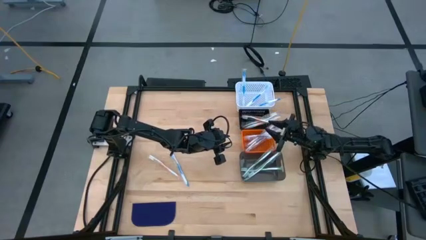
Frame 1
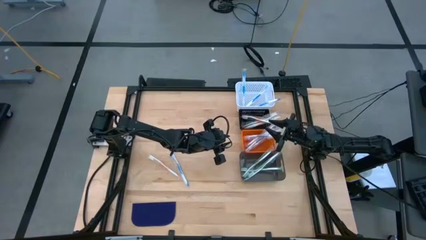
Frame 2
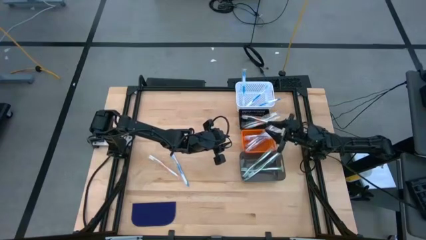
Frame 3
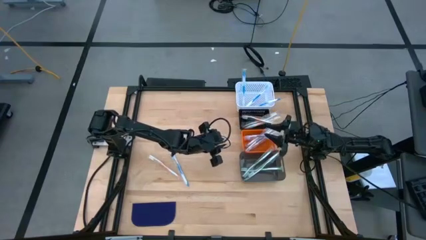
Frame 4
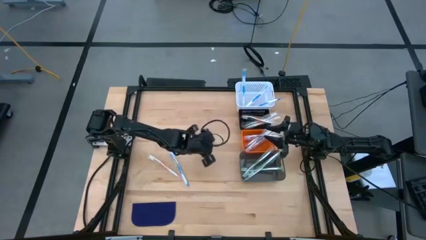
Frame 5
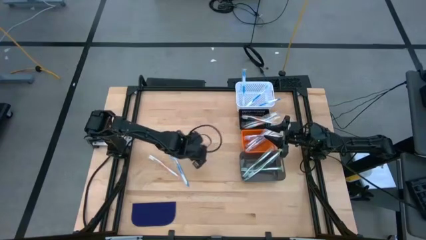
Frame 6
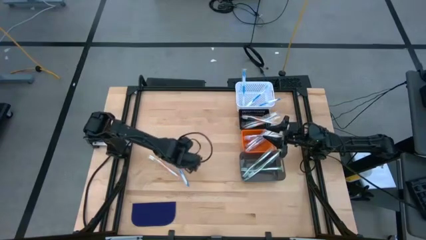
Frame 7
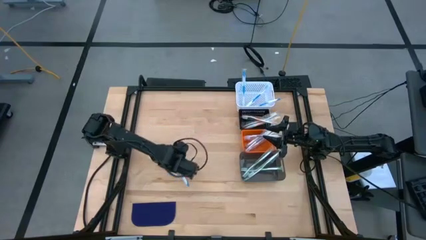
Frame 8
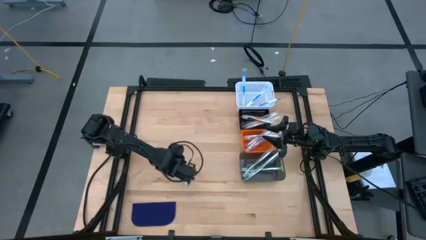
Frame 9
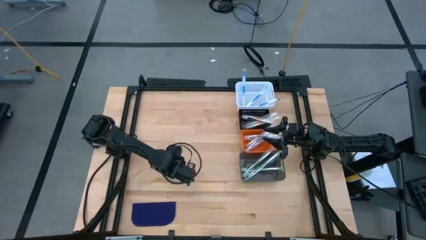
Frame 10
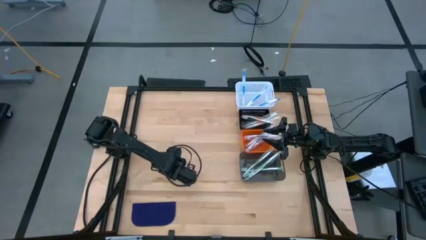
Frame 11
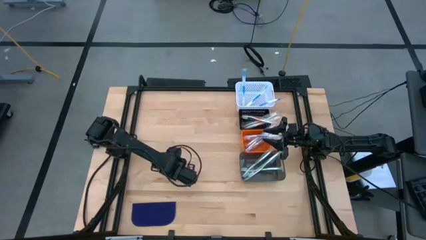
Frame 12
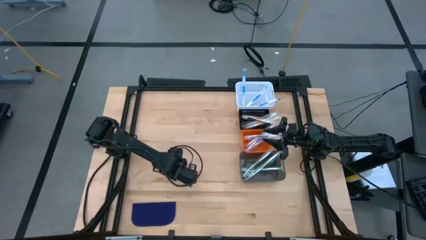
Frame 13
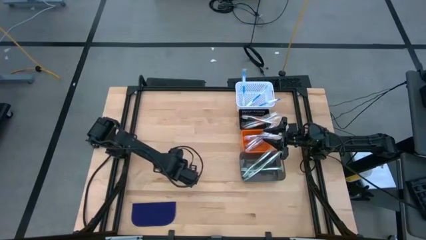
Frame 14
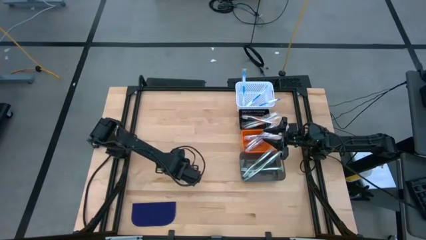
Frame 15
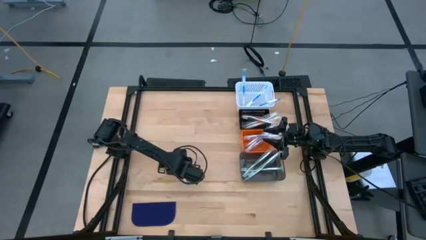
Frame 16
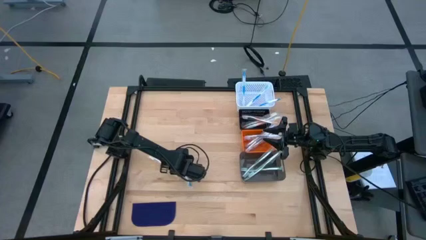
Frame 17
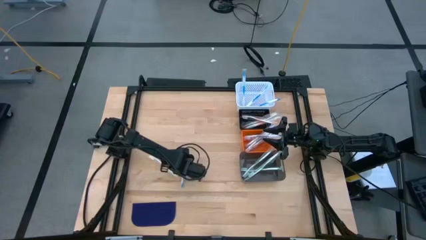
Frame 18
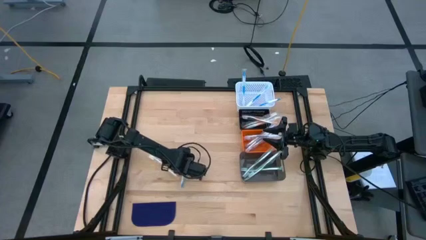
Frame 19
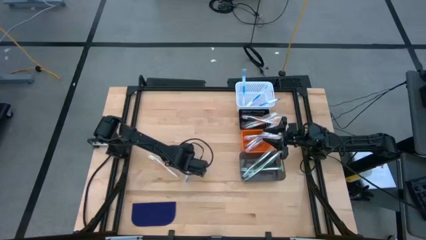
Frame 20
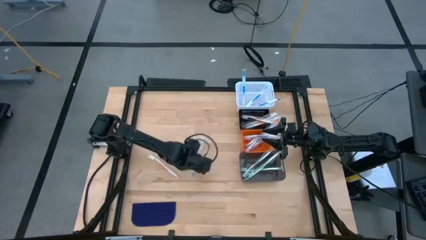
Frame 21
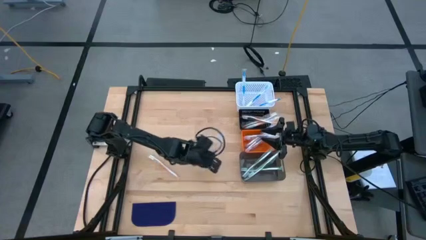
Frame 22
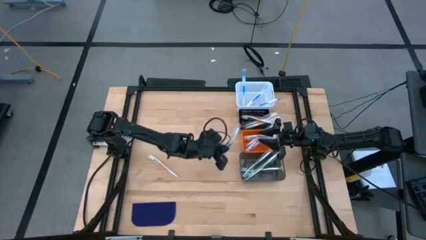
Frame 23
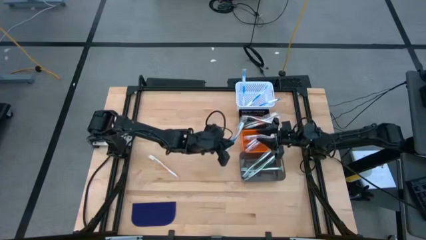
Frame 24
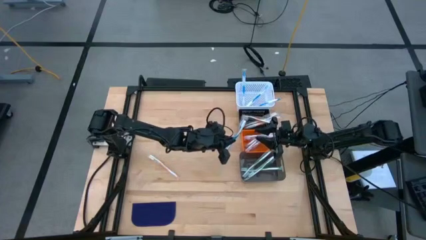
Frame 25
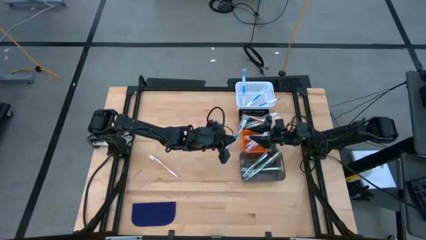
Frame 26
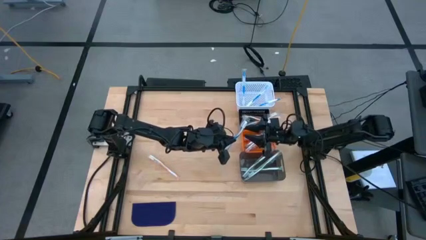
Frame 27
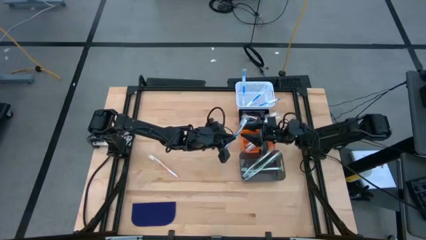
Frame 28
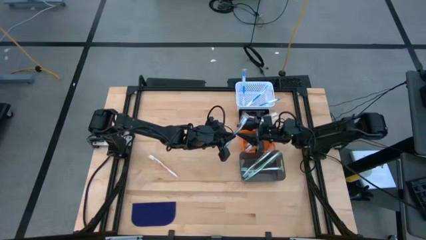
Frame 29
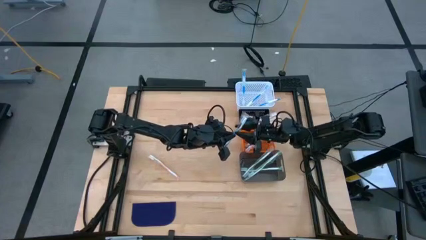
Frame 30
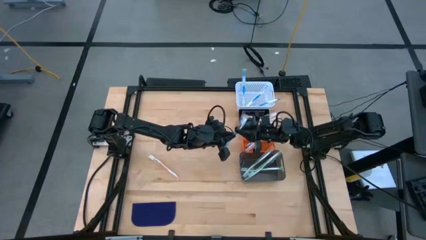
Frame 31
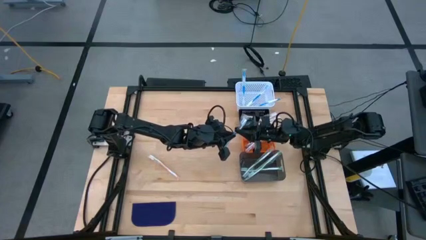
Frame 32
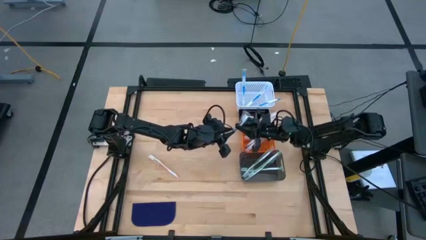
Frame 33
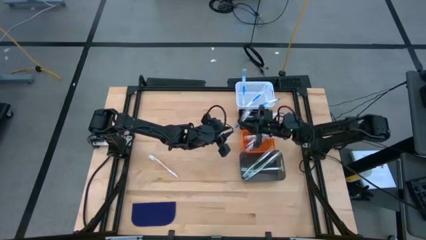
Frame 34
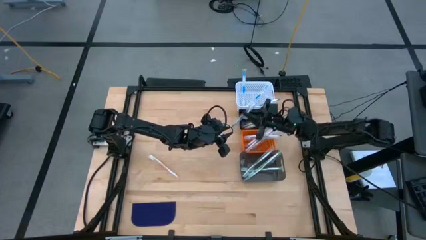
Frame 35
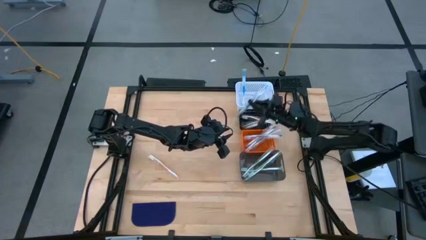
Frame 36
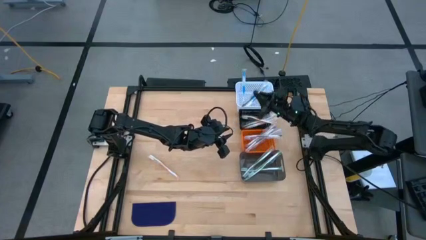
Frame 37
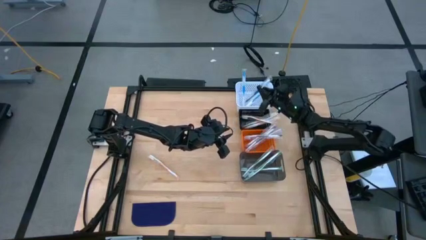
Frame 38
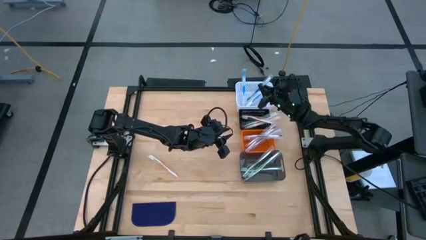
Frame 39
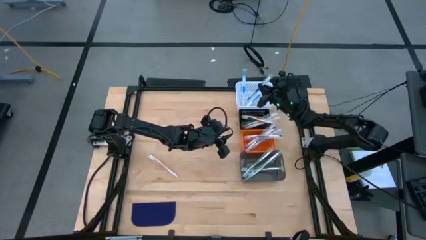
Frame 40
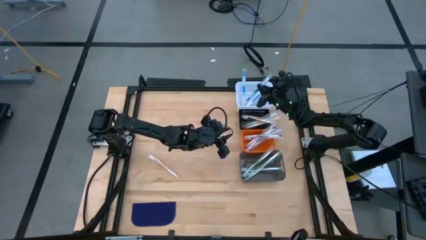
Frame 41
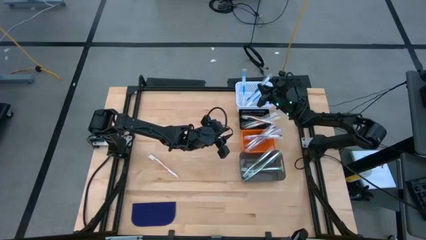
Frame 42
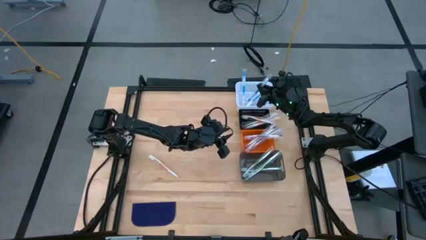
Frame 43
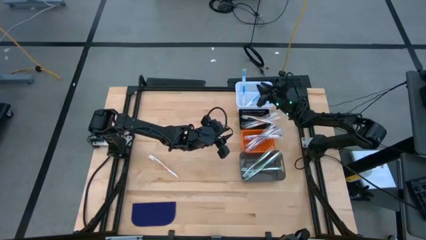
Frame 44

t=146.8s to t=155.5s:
Task: Pick & Place Toothbrushes
Put the blue toothbrush into the white bin

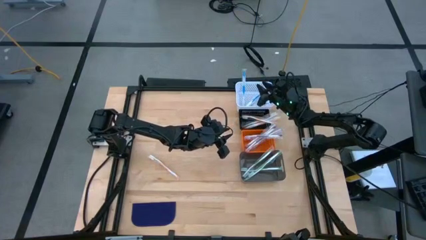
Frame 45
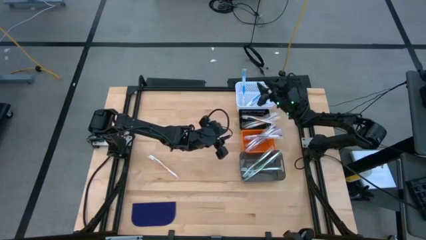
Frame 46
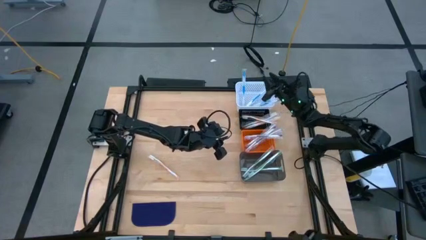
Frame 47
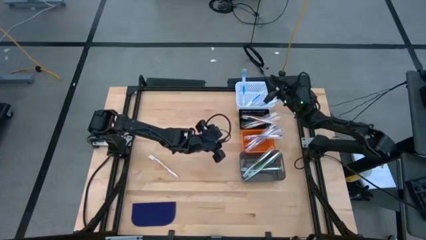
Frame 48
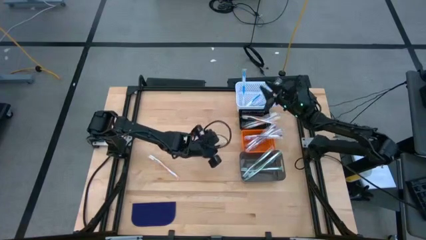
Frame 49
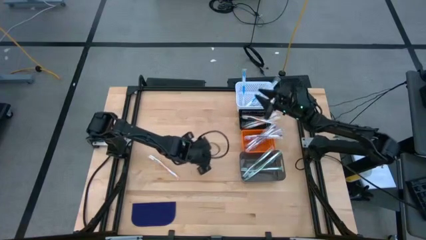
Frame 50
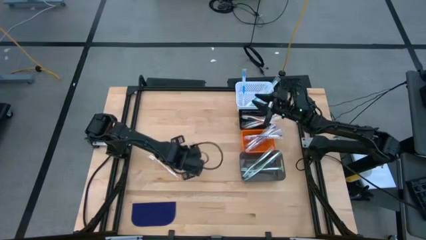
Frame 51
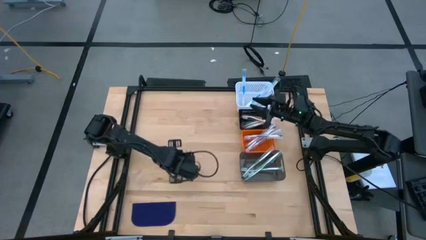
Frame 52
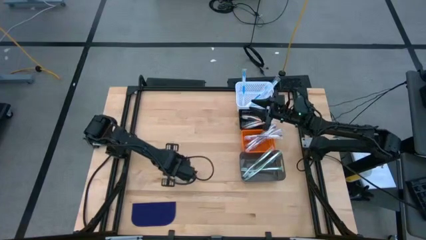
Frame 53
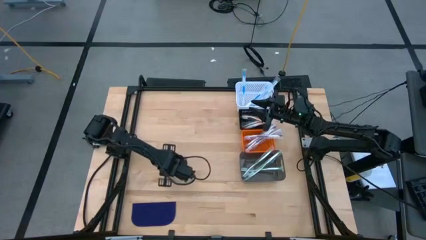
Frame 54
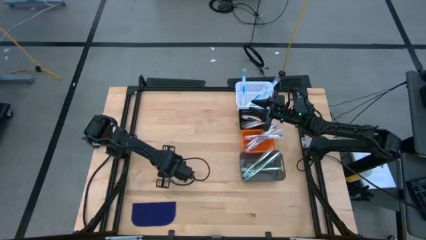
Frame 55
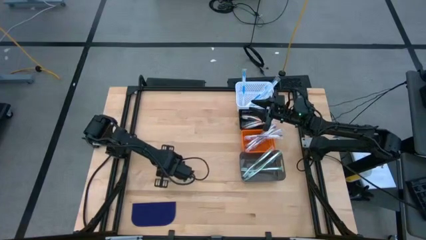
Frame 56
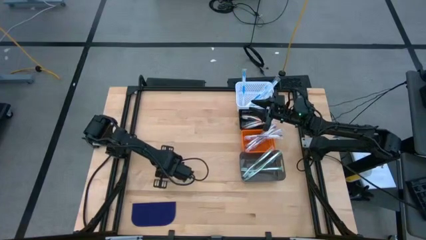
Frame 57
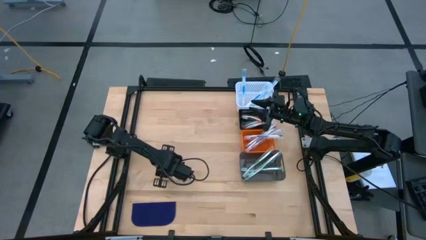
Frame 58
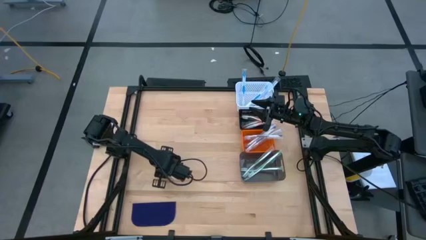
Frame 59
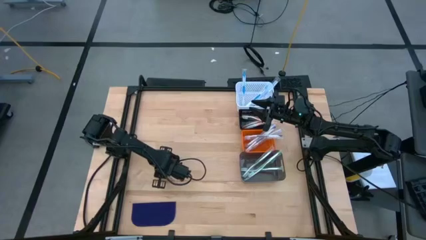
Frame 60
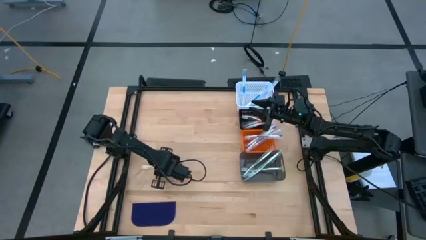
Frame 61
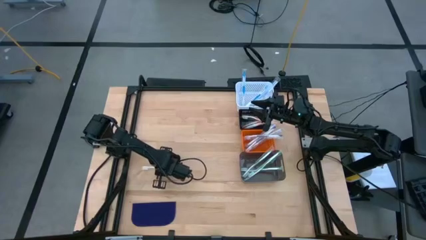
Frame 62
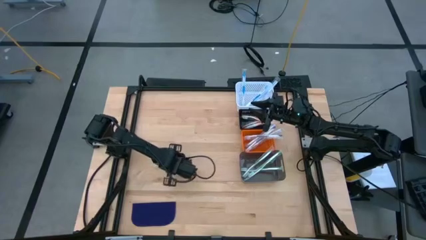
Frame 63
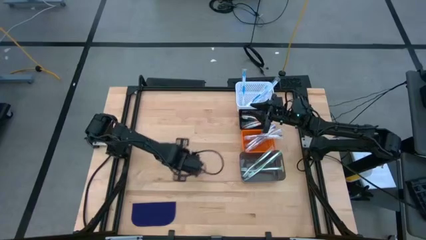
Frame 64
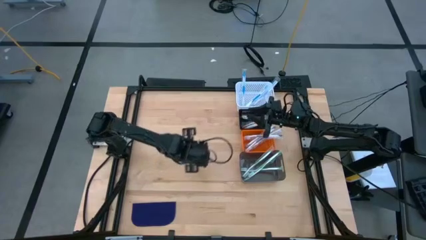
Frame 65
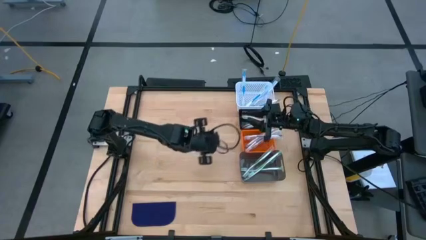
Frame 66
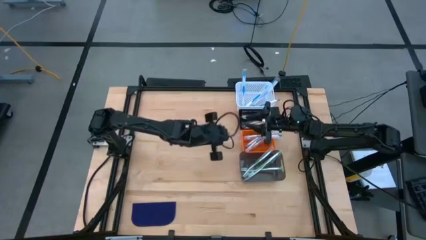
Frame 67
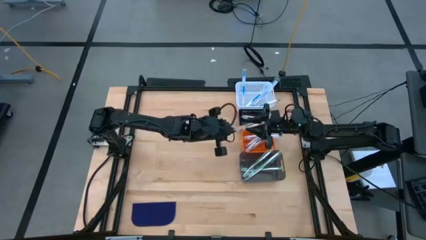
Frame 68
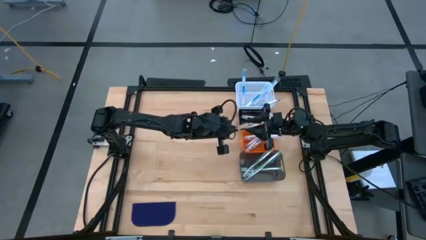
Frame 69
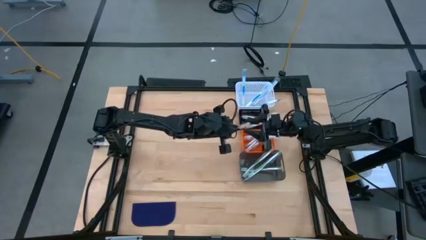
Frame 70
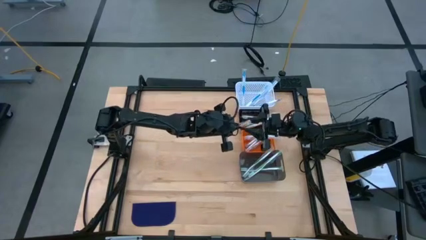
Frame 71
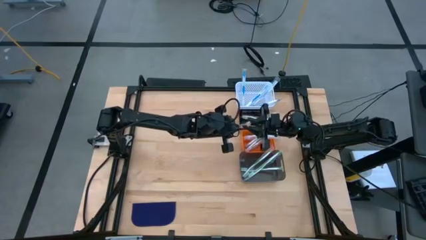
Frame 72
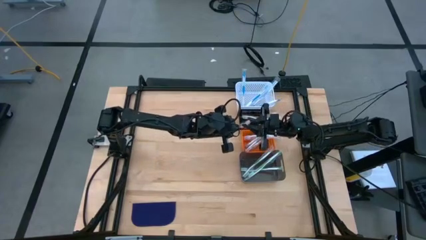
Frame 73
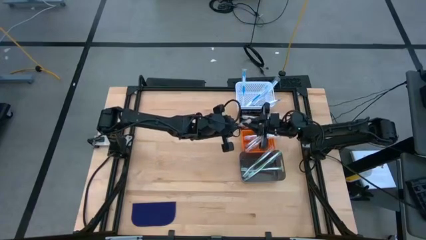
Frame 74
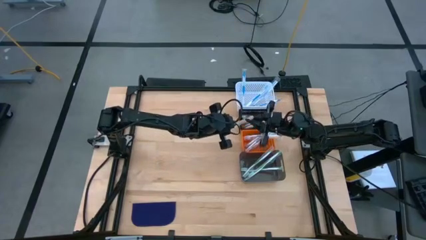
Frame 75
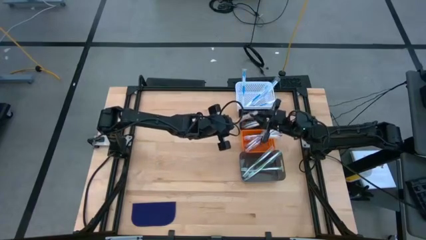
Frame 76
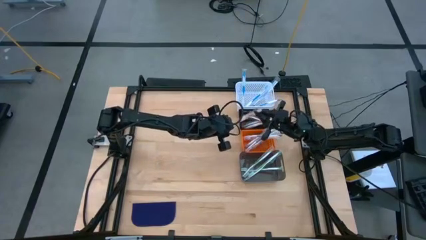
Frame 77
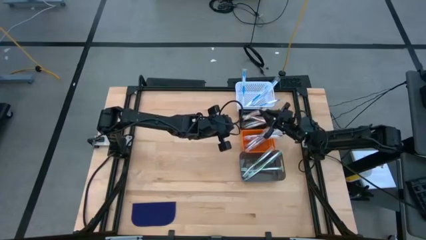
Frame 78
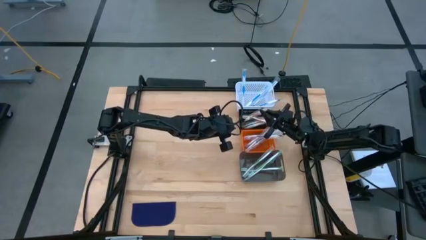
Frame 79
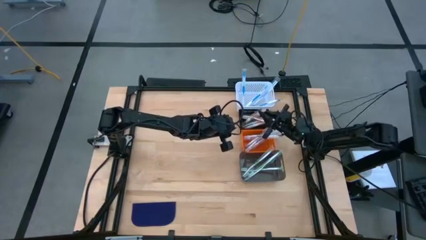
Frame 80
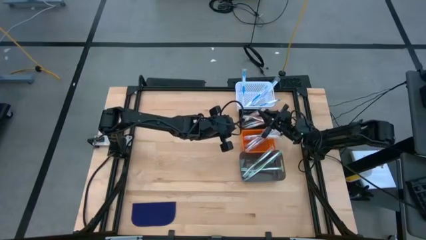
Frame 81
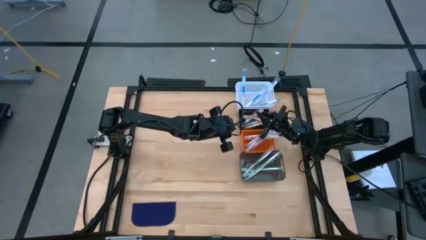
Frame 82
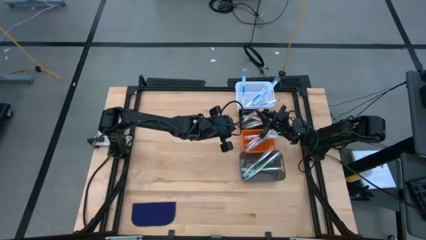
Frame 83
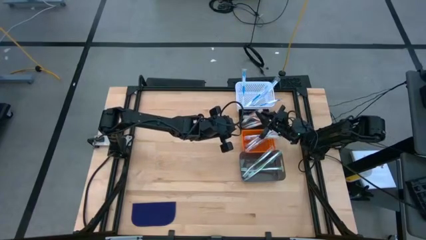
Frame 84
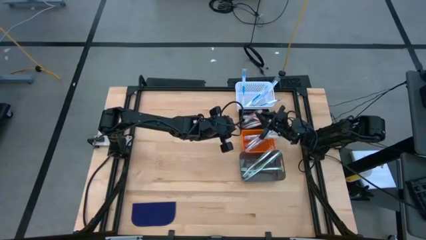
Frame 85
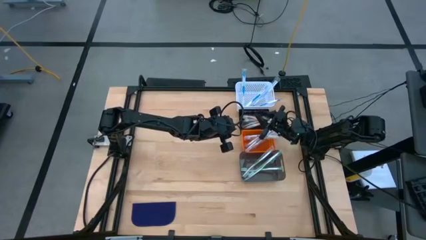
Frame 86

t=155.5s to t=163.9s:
Put the orange toothbrush into the black bin
